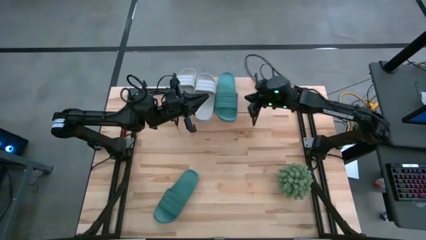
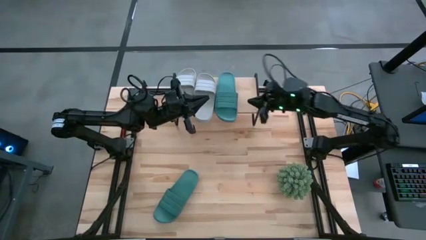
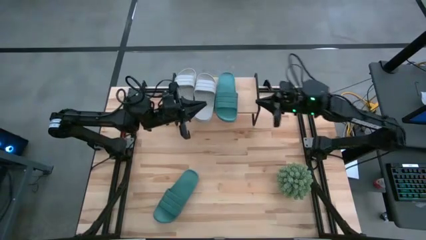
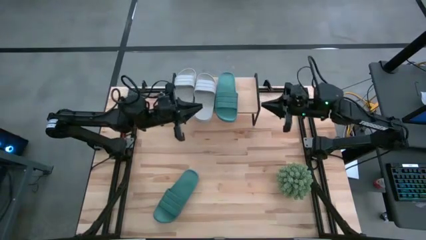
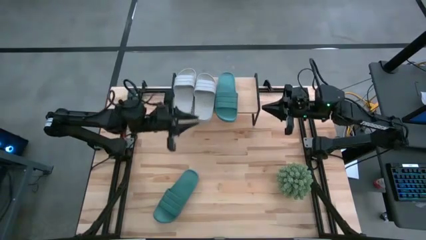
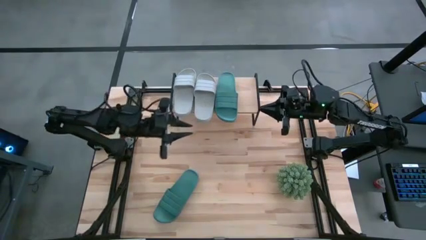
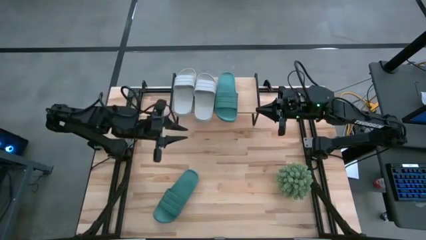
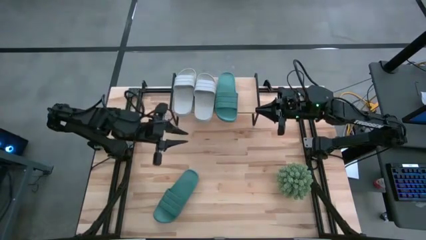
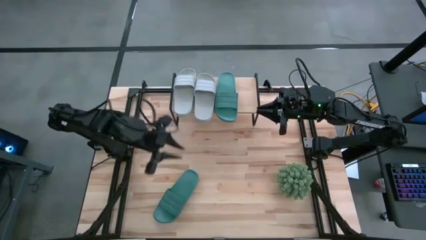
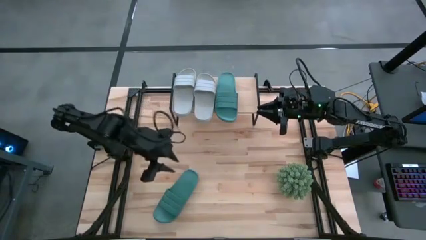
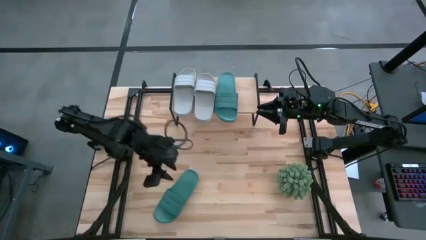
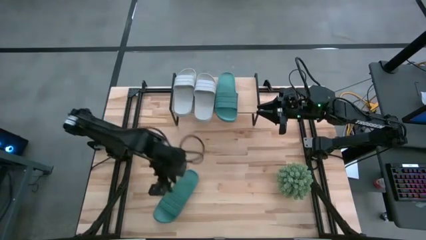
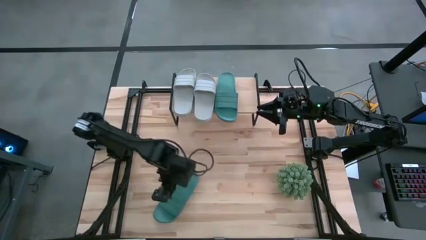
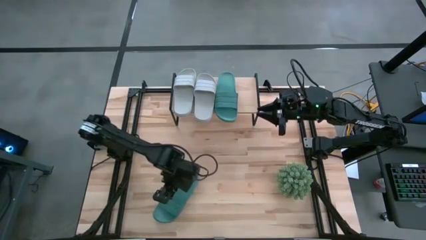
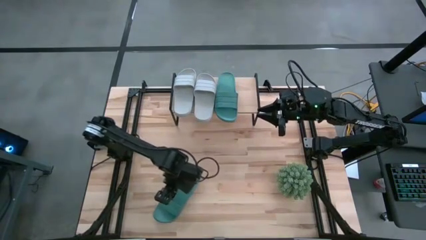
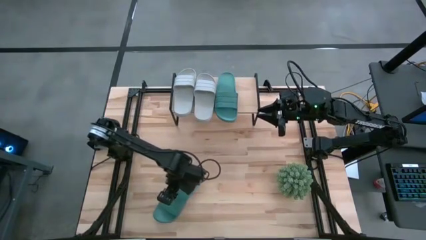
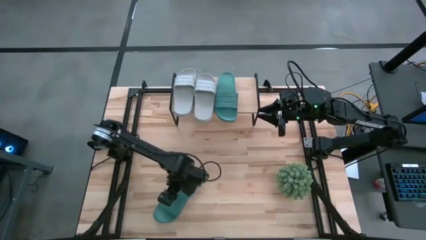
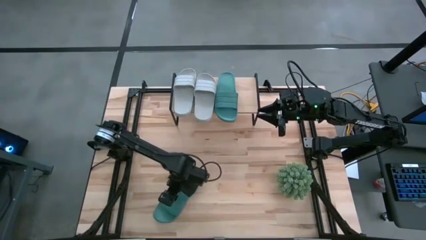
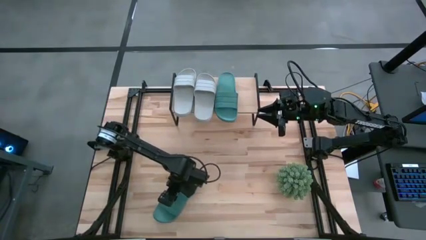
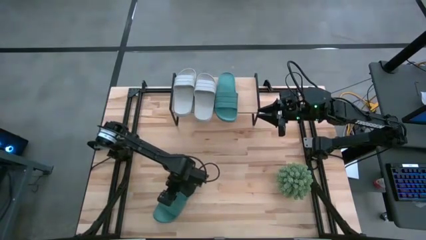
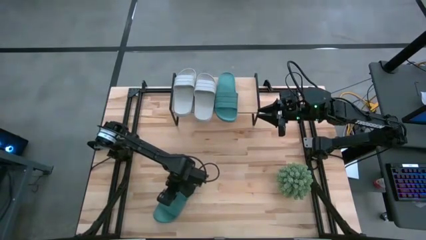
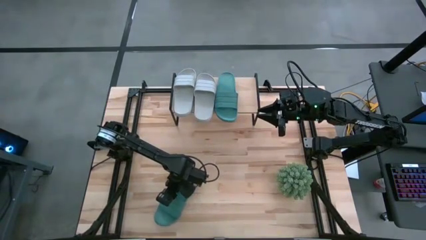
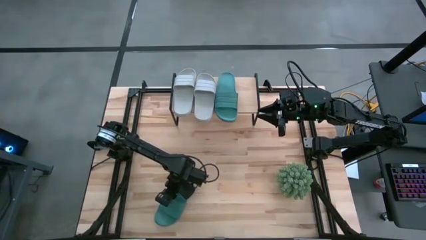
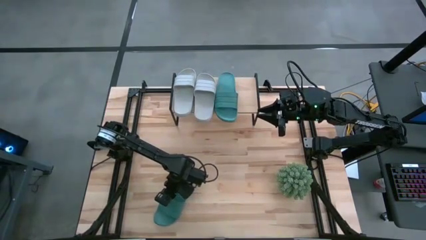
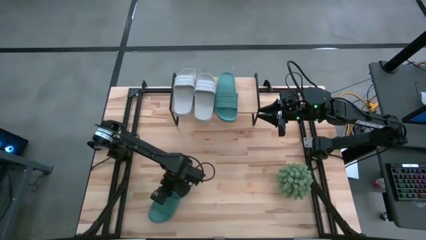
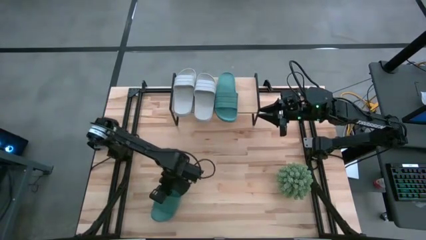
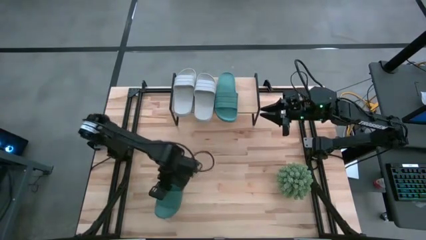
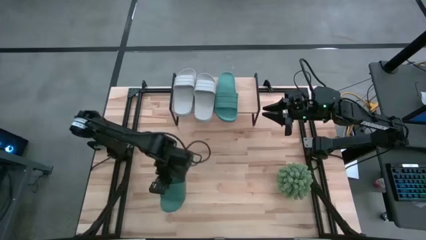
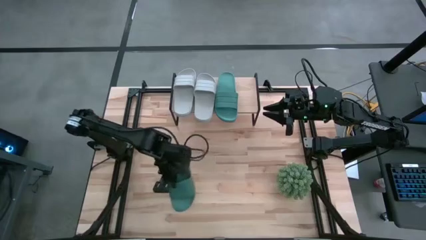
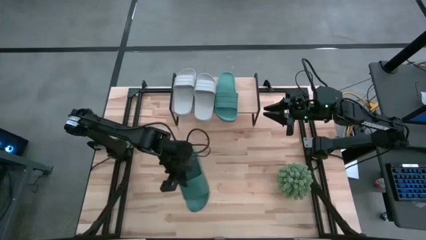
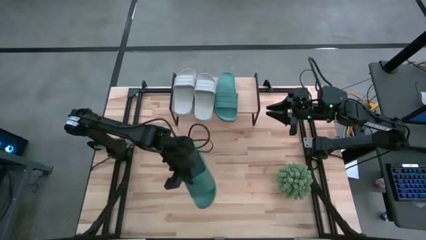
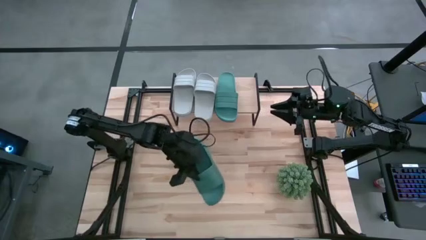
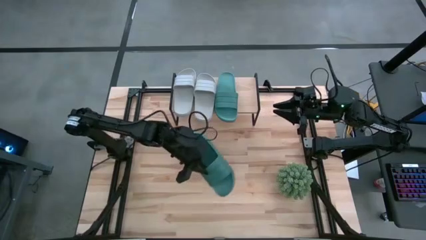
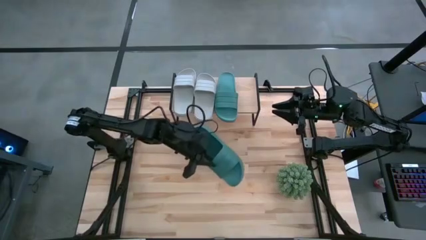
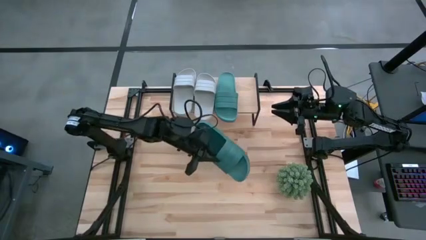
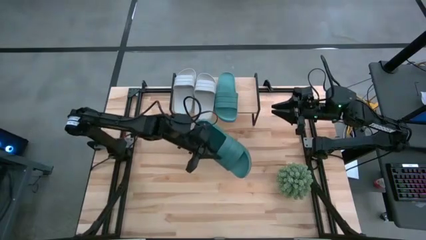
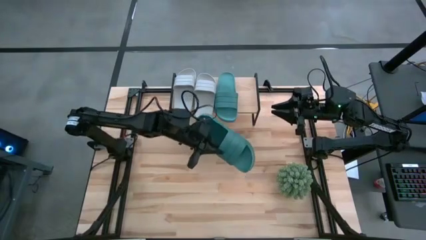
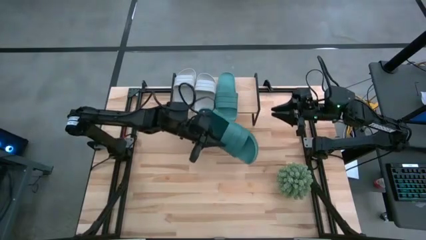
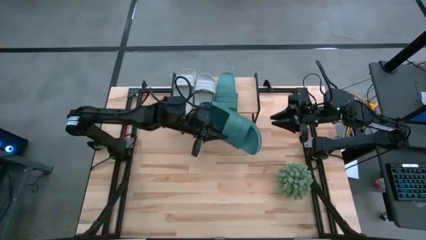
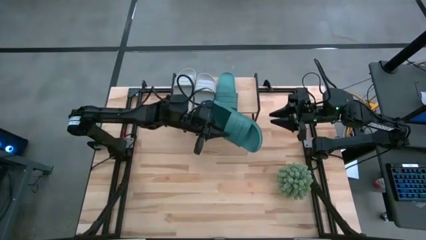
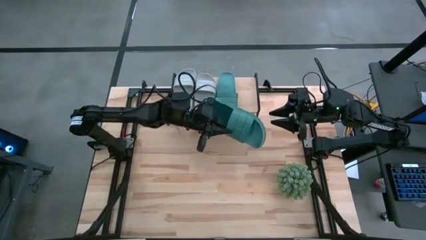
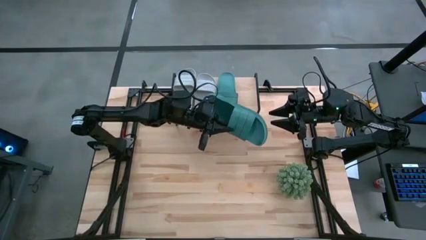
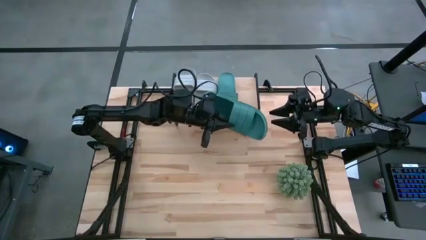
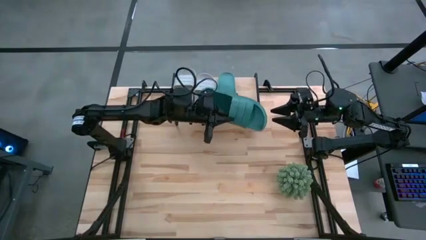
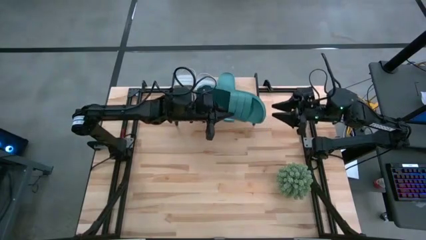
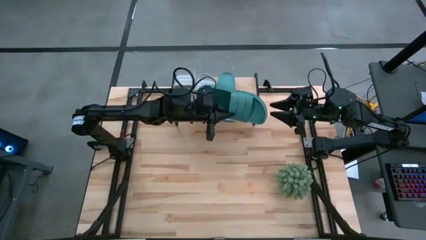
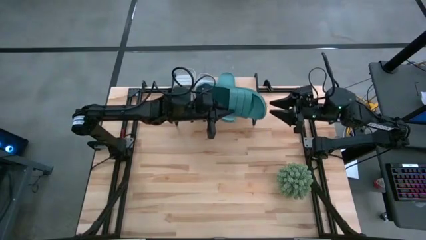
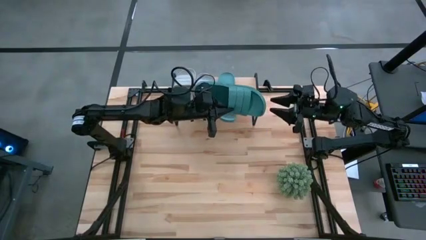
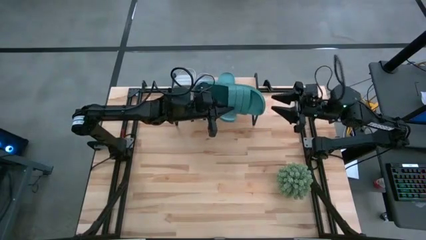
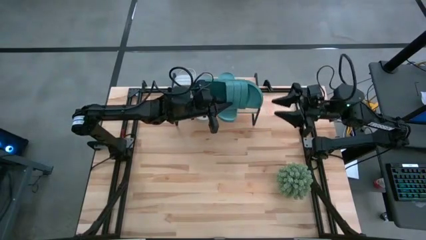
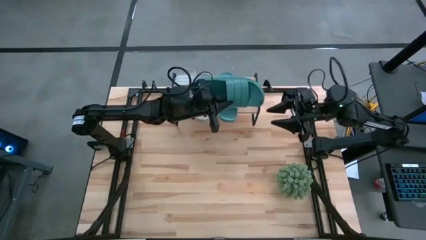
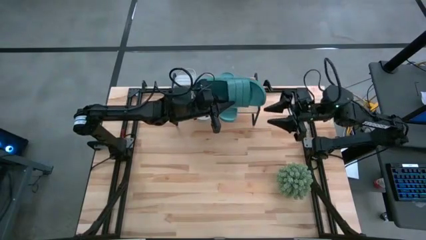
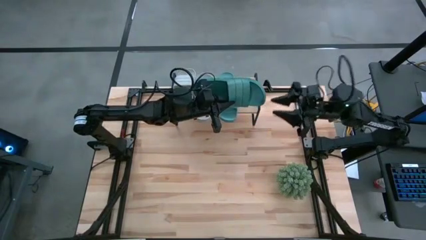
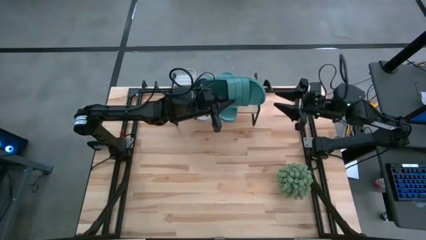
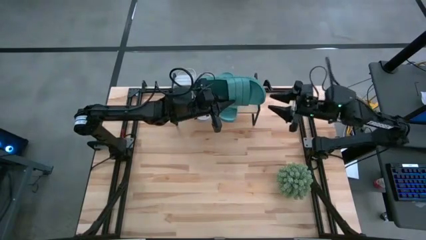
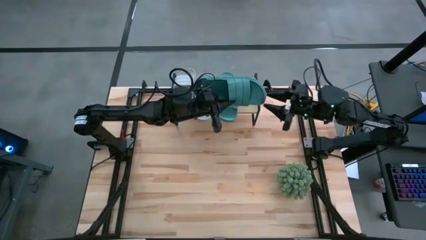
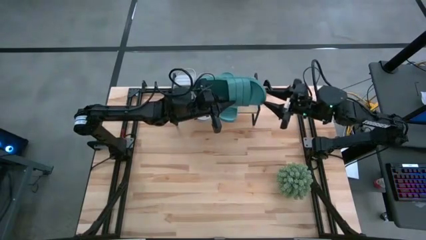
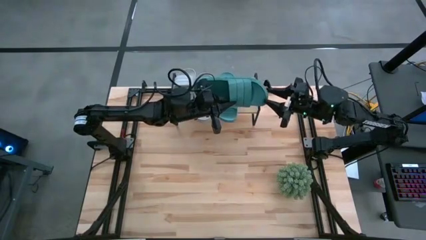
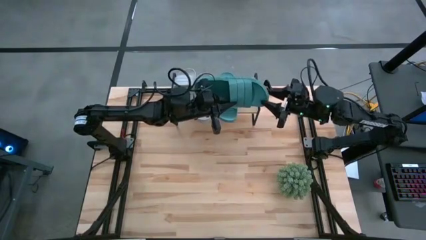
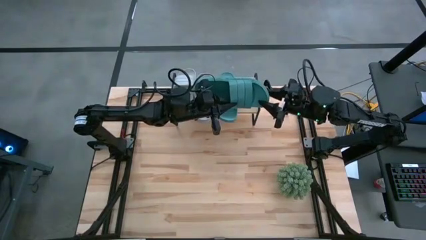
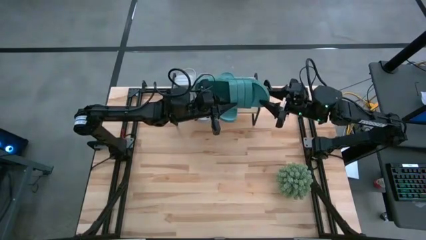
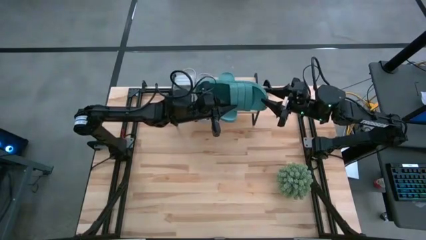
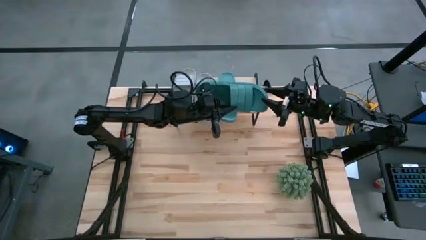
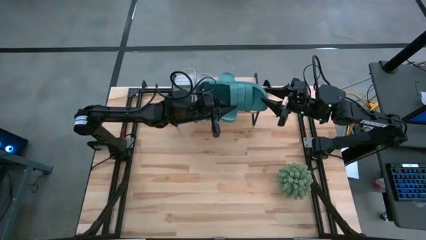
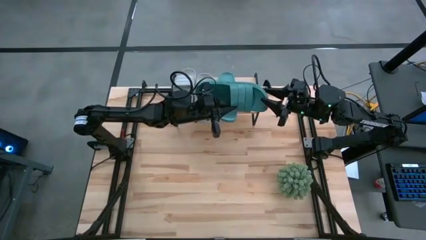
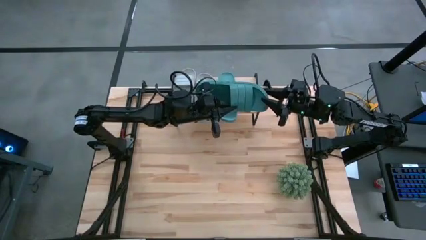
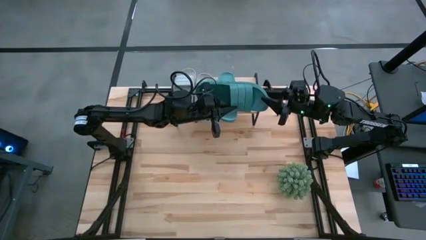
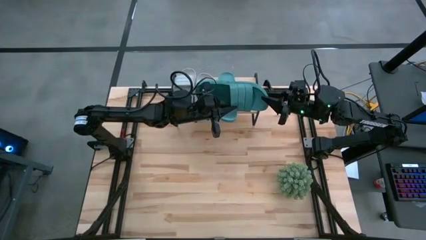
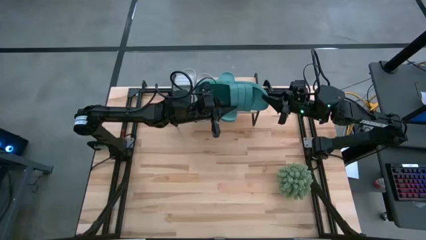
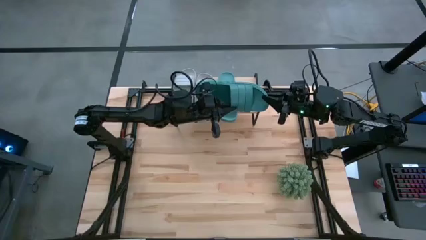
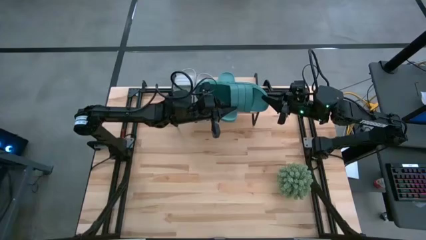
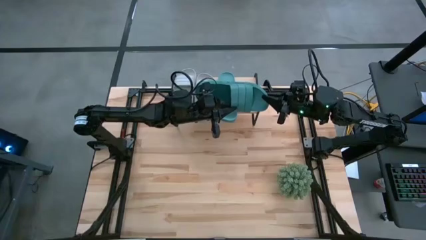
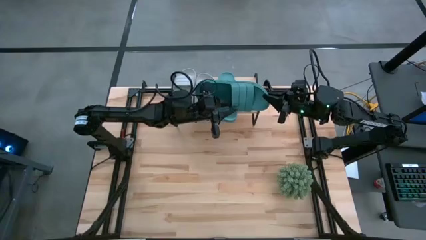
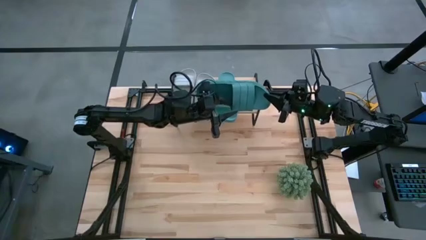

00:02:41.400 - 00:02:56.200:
Task: Pick and place slides into the shelf
Put the green slide on the shelf

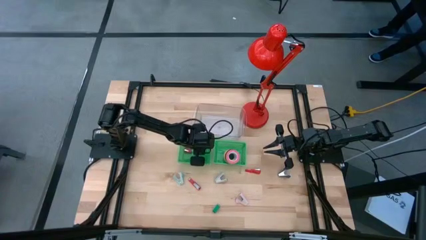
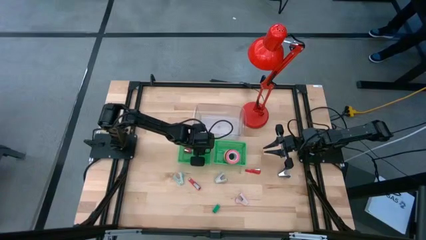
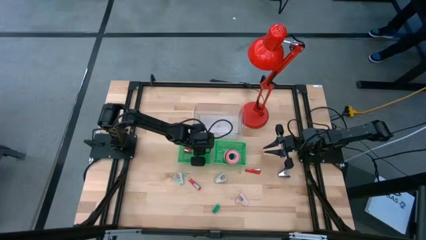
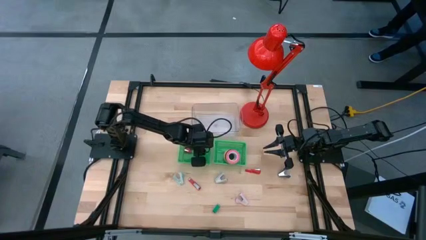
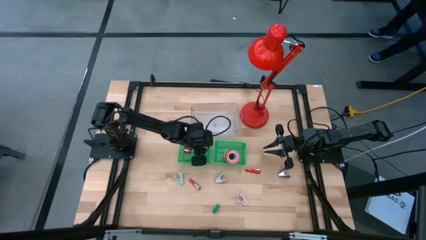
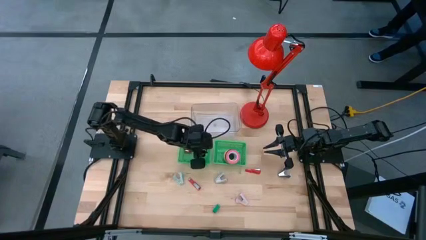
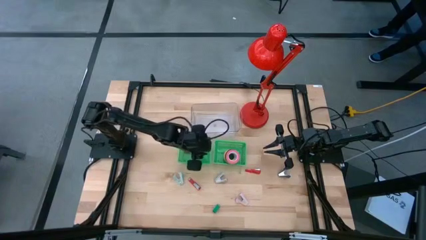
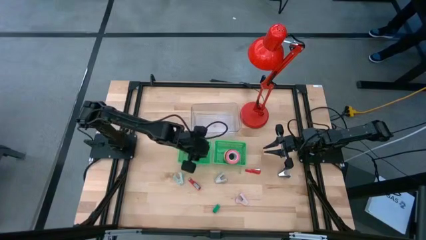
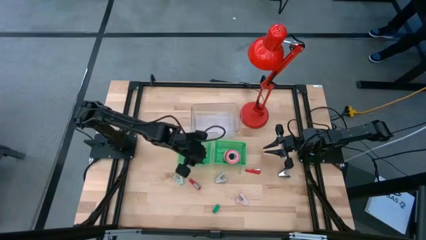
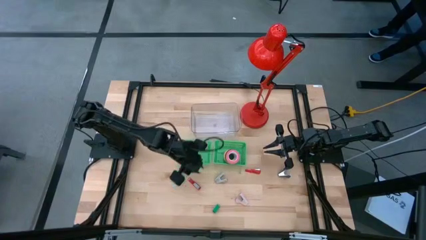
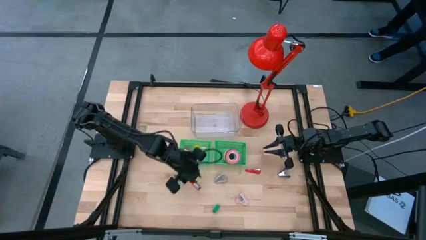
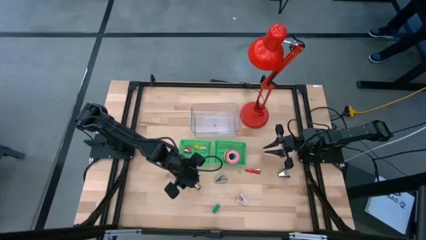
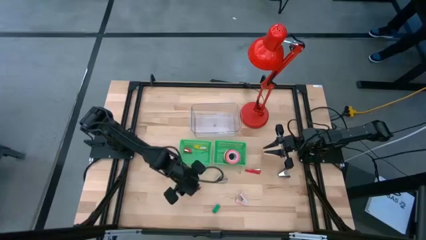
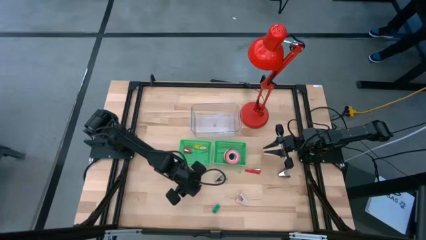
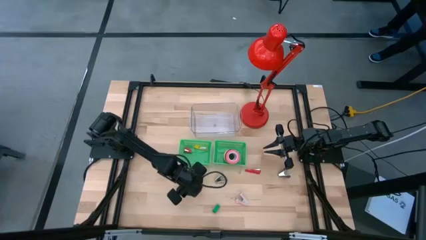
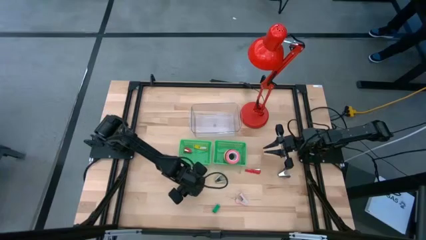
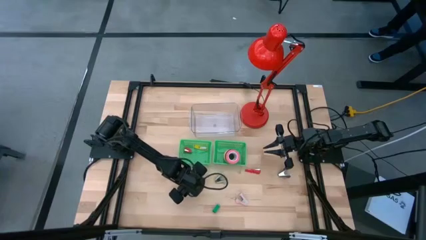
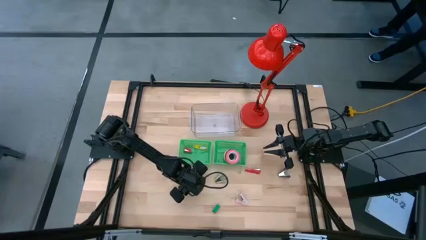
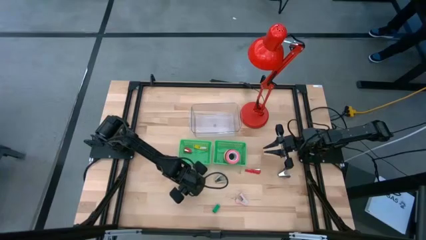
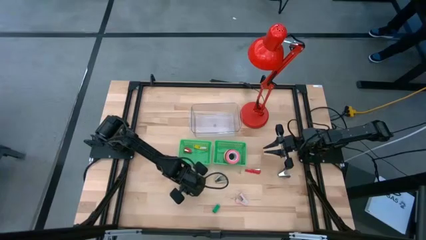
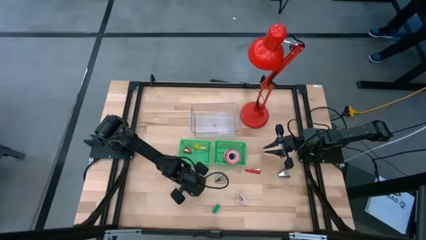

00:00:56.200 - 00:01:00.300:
Task: Pick and place Stapler, Stapler remover, tape
Put the bottom red stapler into the left green bin
